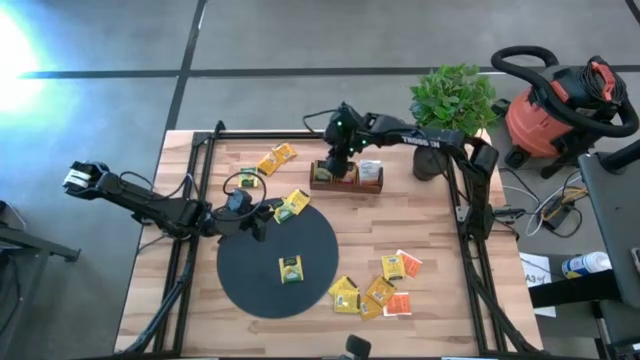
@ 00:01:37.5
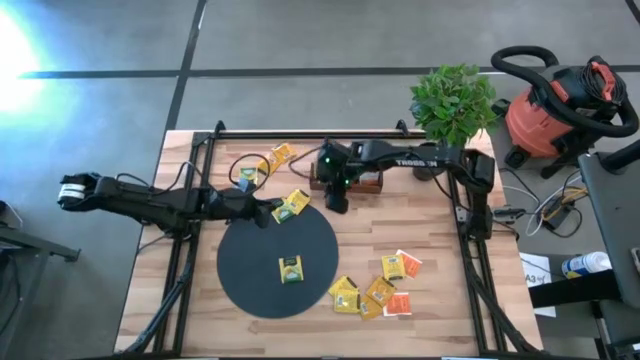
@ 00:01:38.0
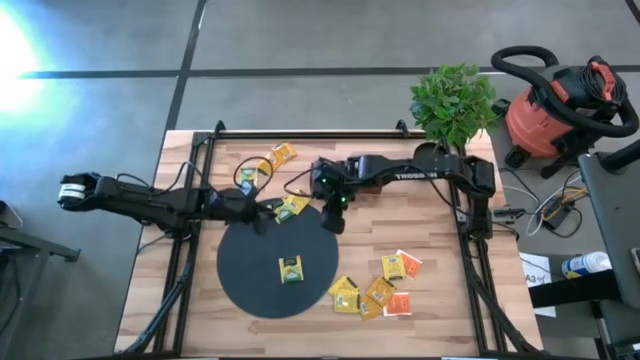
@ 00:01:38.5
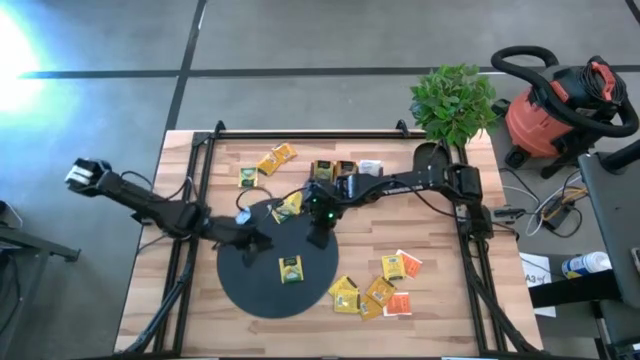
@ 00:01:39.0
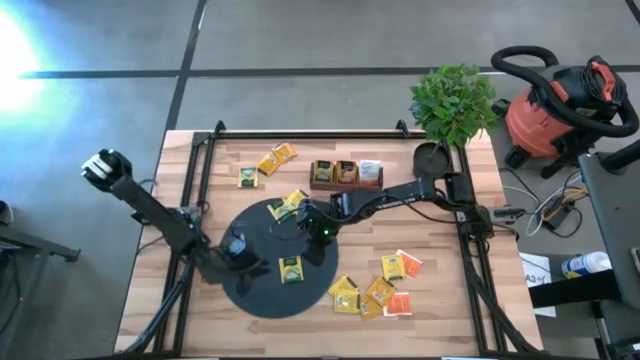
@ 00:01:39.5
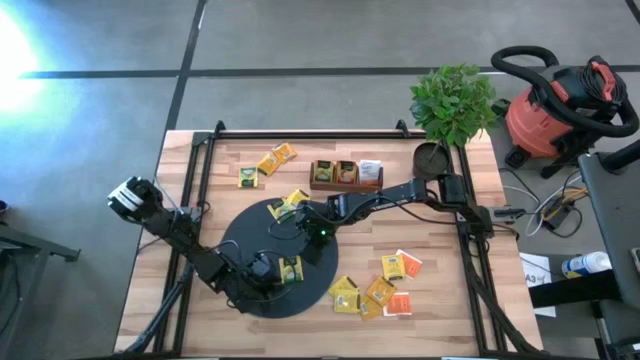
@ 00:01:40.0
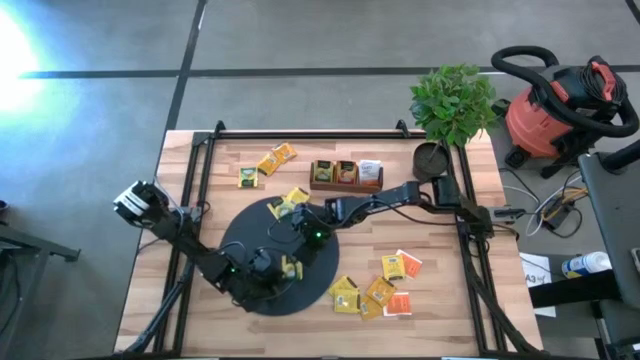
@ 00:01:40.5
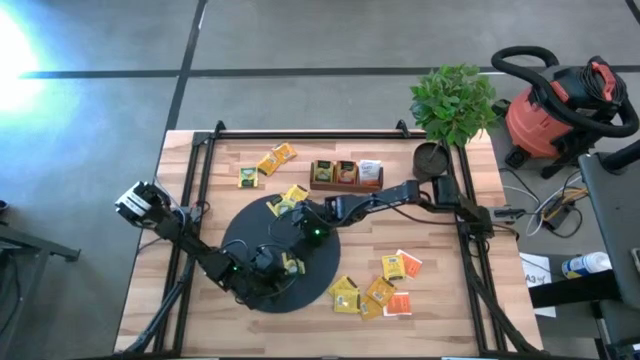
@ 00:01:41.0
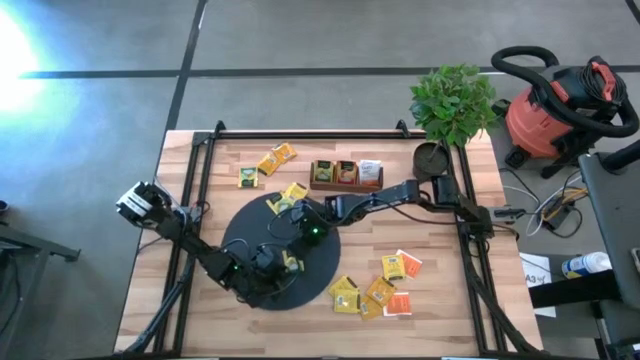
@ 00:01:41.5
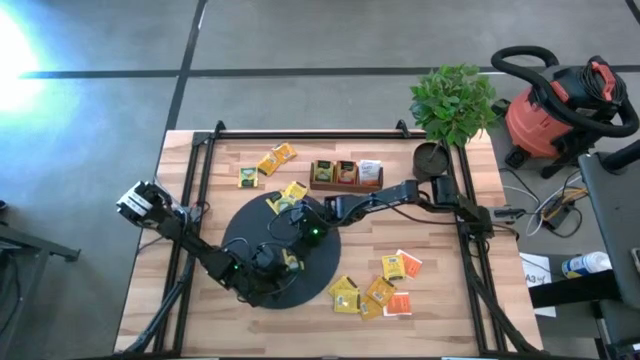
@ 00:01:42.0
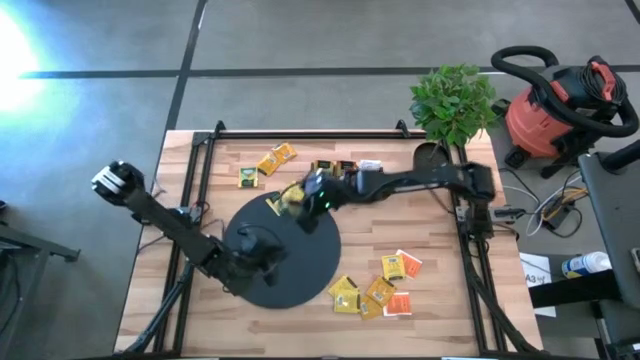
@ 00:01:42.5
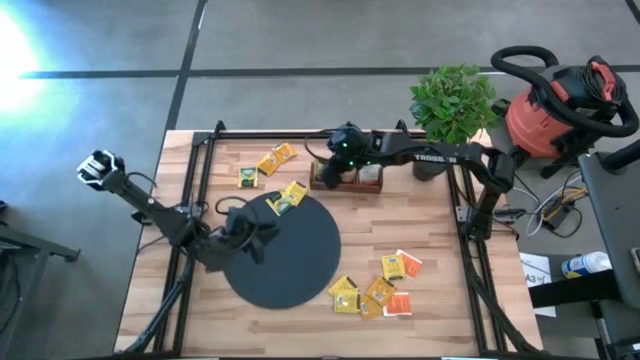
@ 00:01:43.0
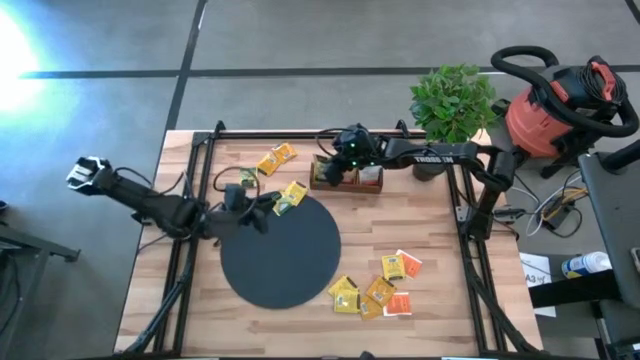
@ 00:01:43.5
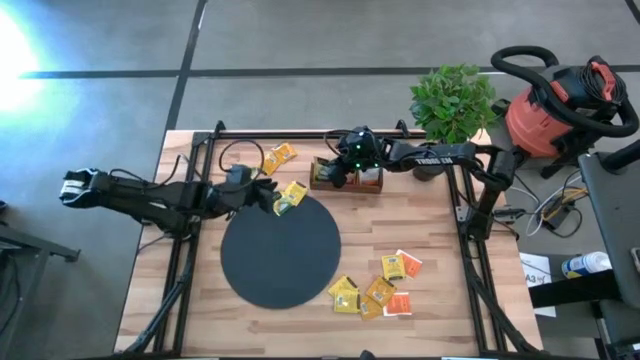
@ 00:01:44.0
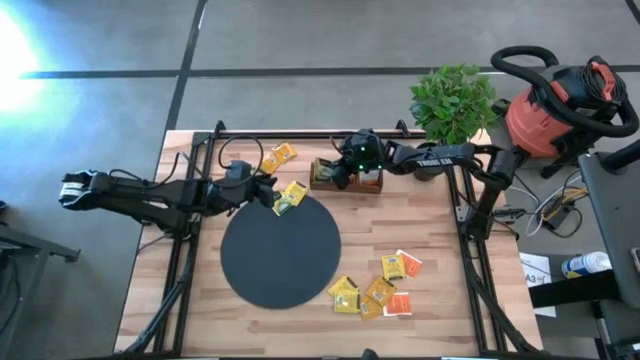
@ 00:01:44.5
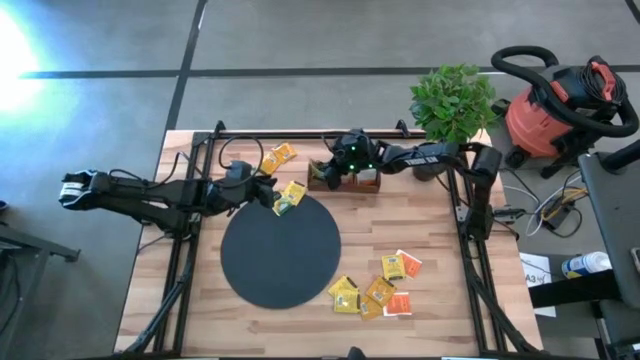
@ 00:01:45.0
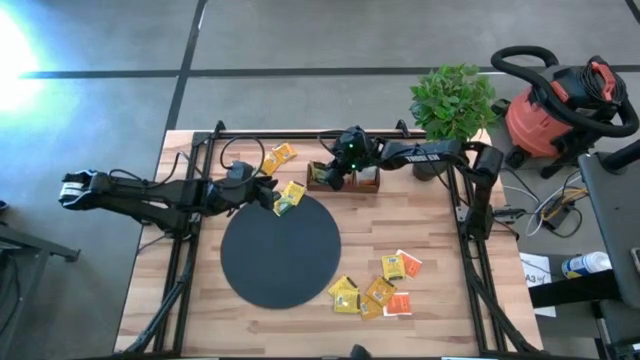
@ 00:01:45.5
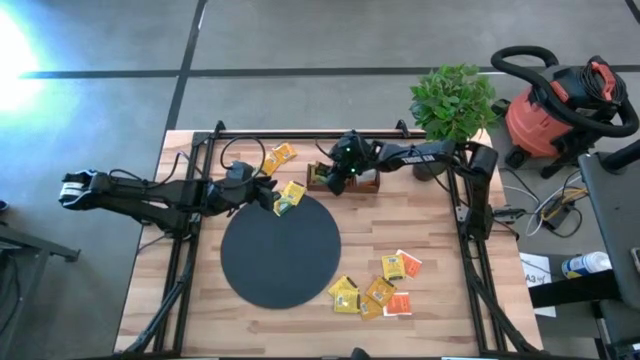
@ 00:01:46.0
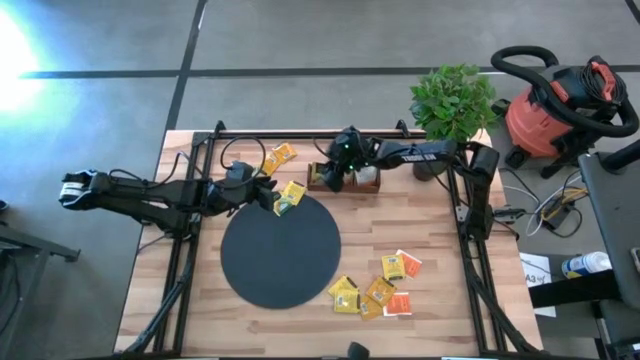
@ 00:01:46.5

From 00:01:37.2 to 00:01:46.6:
Task: Pick & Place Tea
Put the yellow tea bag into the left section of the wooden organizer

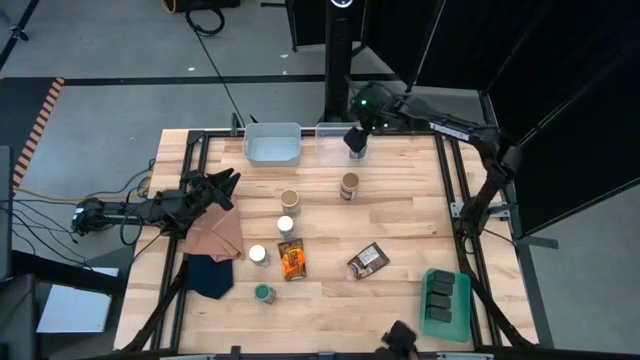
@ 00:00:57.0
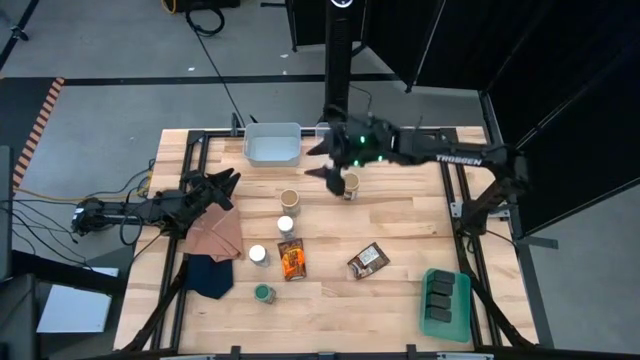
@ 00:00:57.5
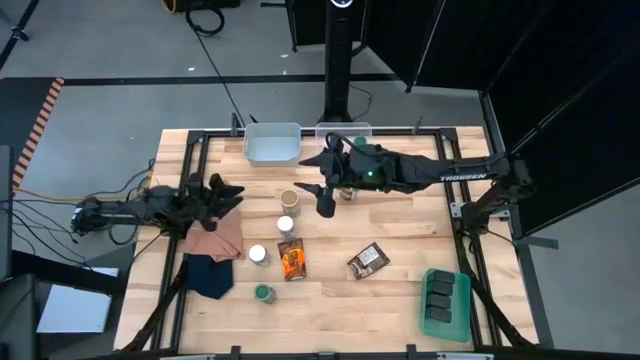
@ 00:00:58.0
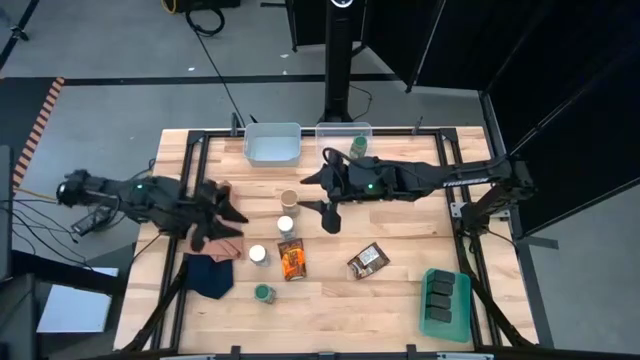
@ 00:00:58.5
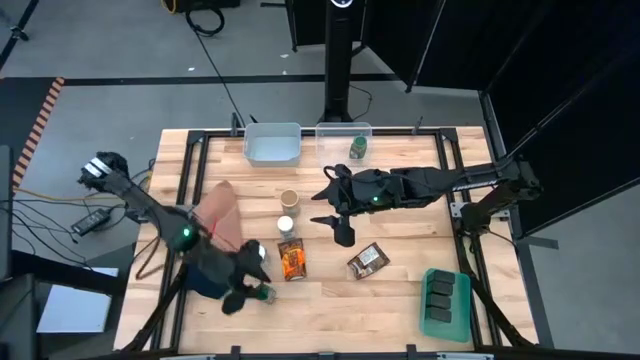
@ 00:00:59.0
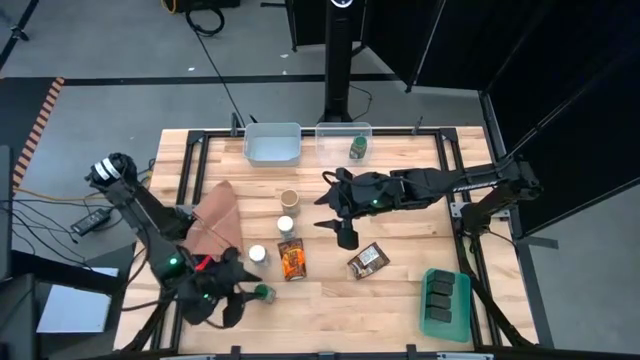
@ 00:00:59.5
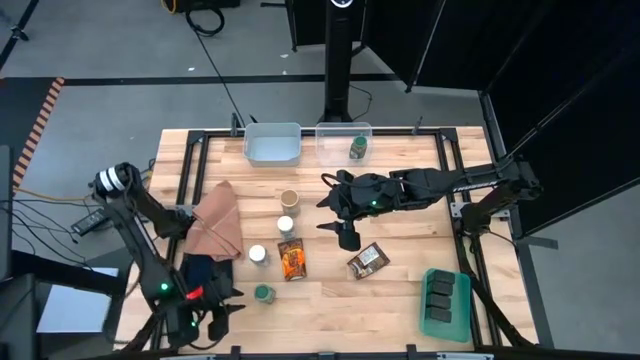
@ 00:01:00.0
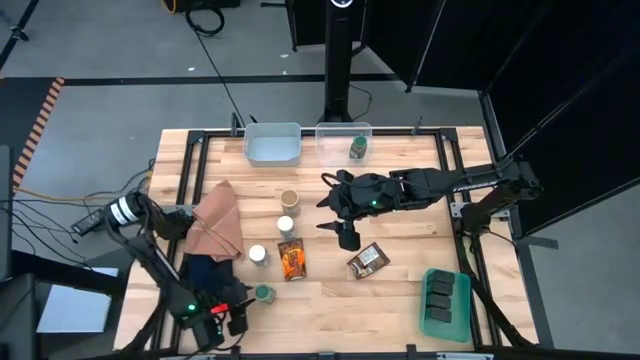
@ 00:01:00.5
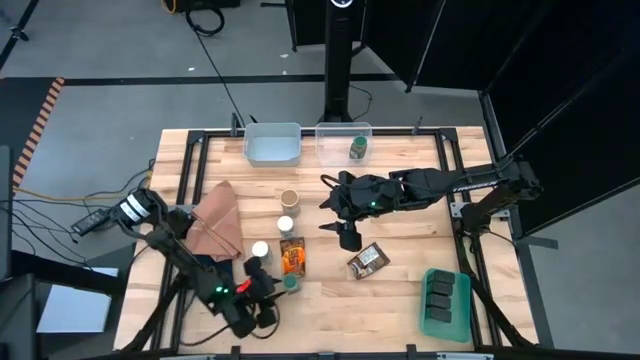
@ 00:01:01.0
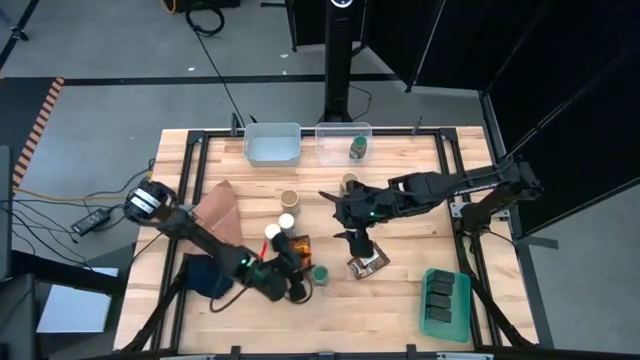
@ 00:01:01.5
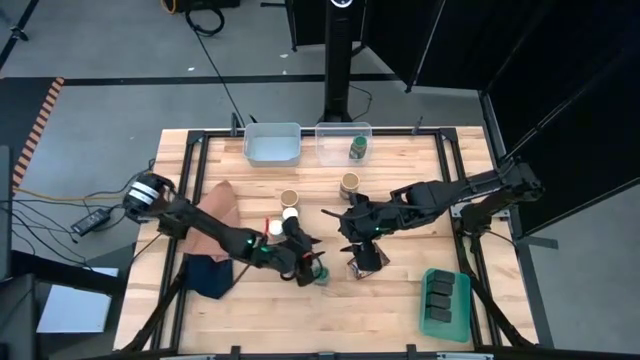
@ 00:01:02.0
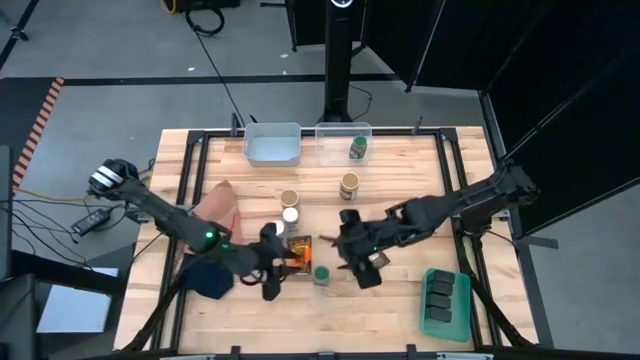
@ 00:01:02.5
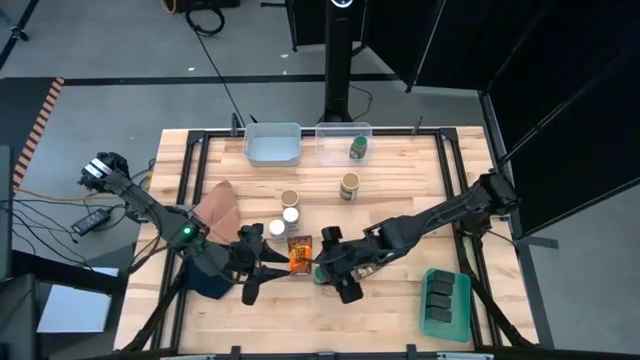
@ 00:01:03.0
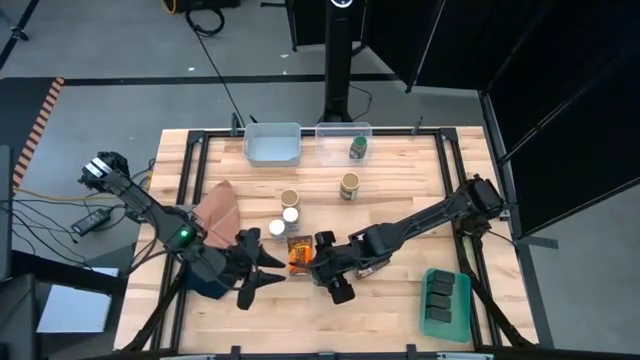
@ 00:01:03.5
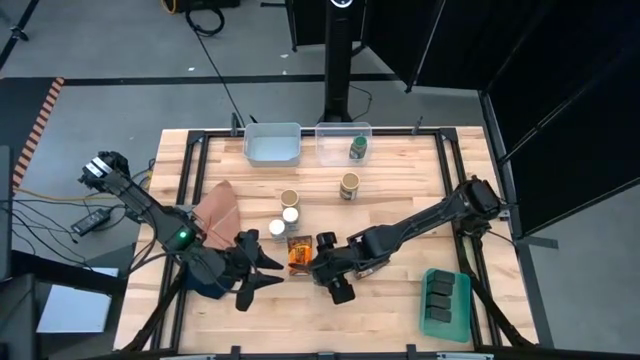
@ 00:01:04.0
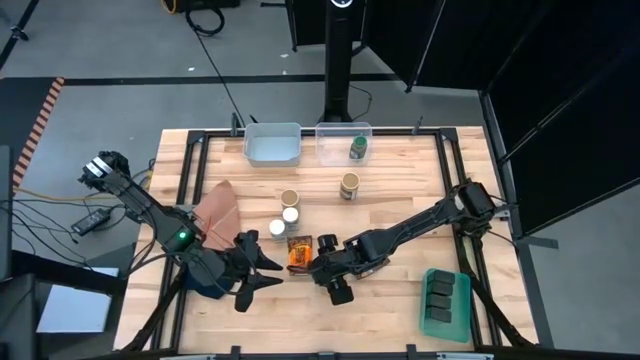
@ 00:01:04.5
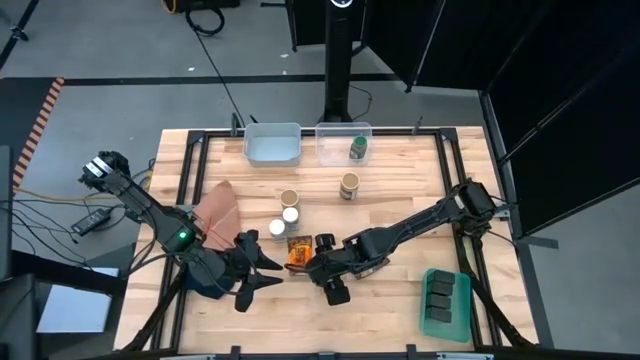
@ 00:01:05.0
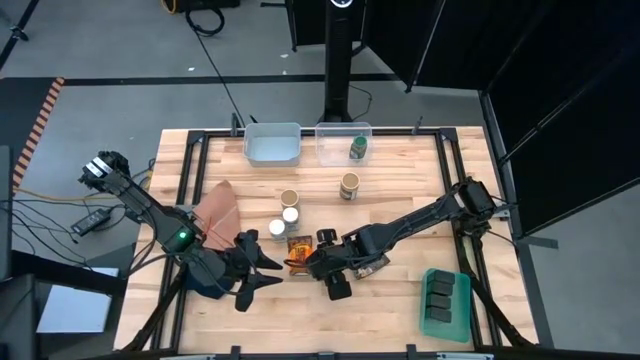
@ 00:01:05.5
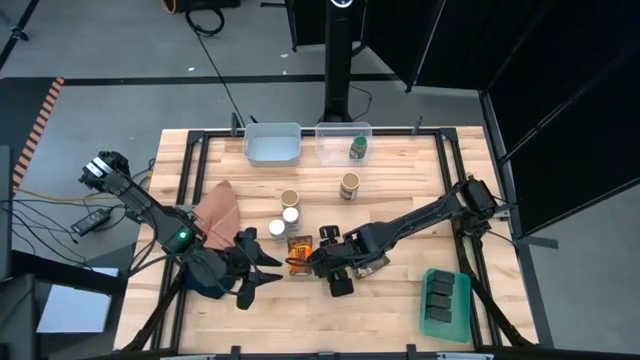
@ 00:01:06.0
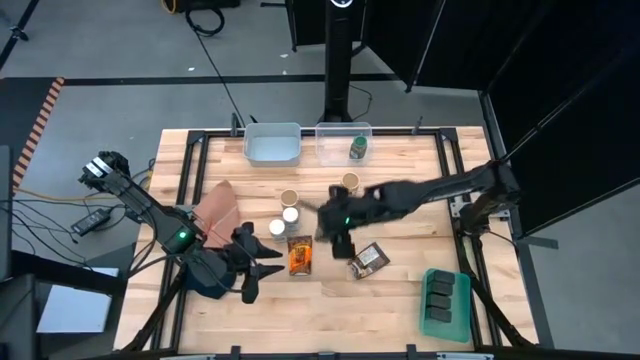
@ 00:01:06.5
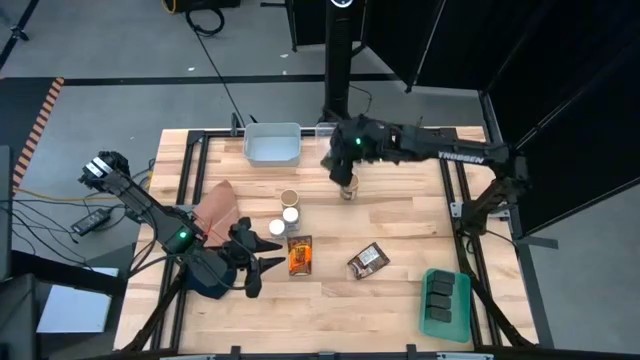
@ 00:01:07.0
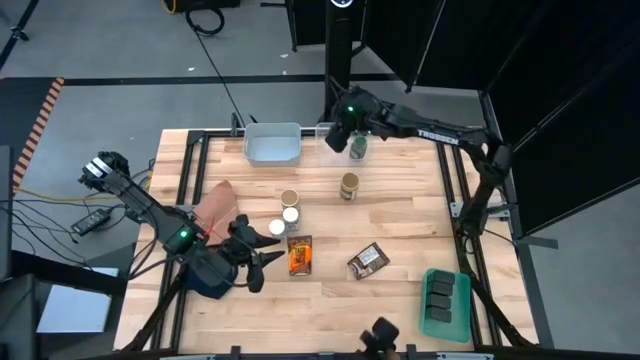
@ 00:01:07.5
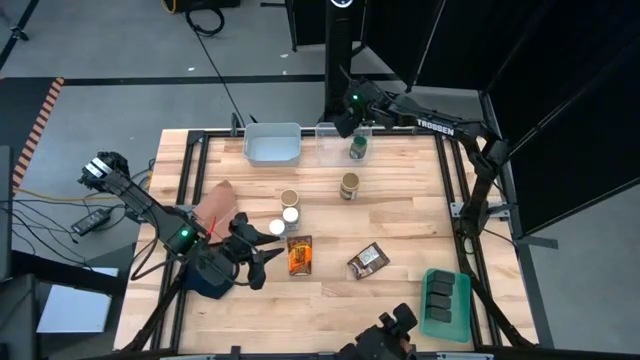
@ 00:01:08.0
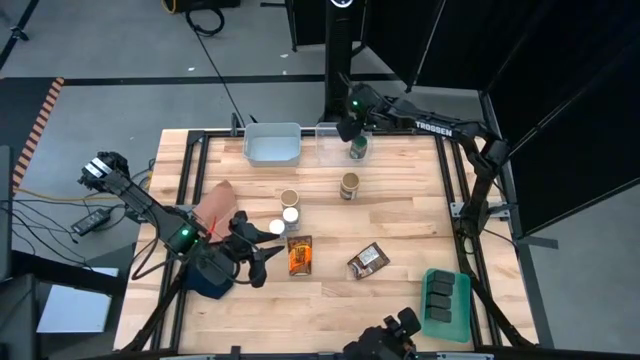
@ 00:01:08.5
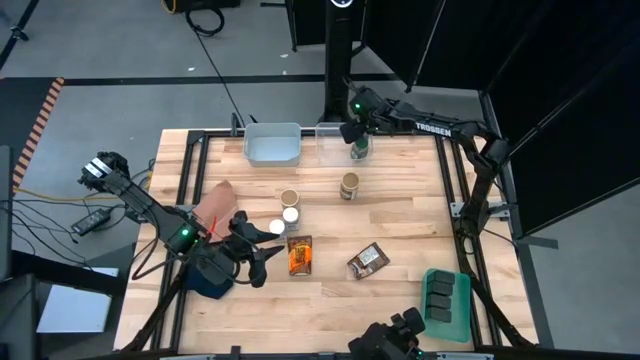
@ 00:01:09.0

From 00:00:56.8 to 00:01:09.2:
Task: Sort spices by type
Put the green seasoning bottle into the transparent bin
